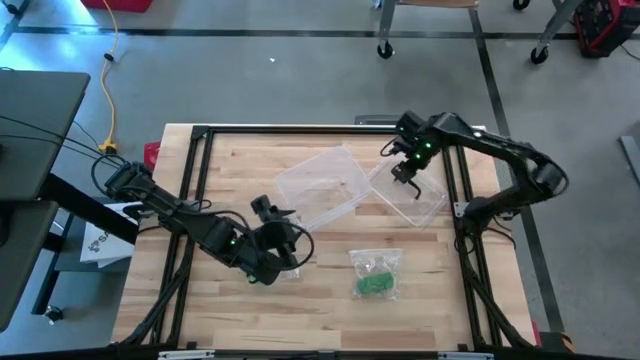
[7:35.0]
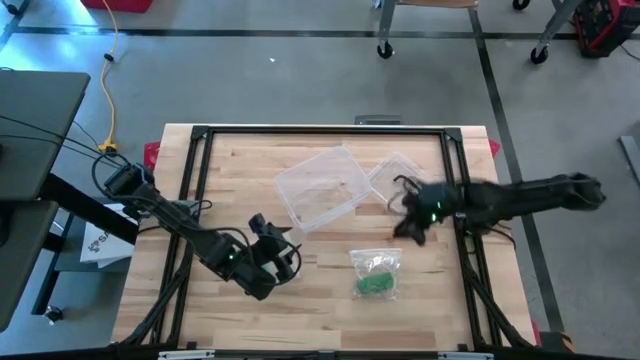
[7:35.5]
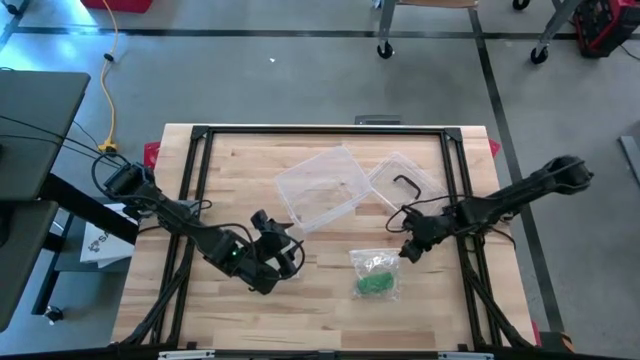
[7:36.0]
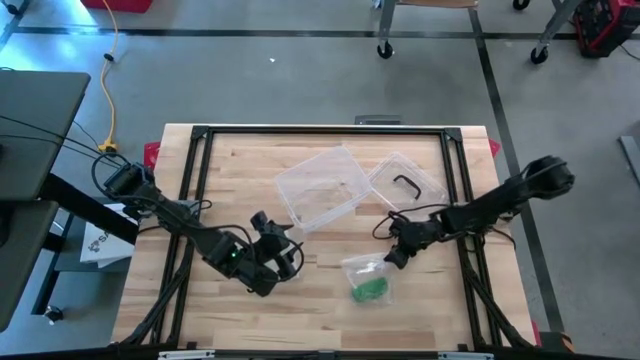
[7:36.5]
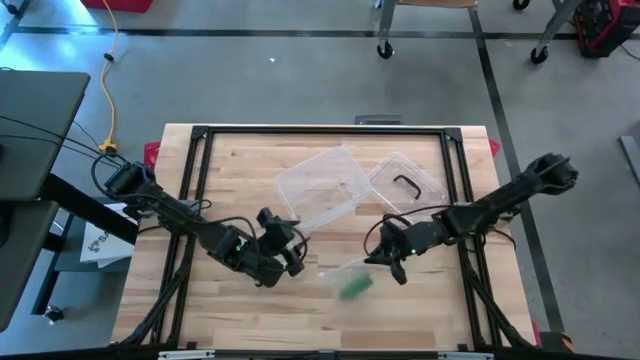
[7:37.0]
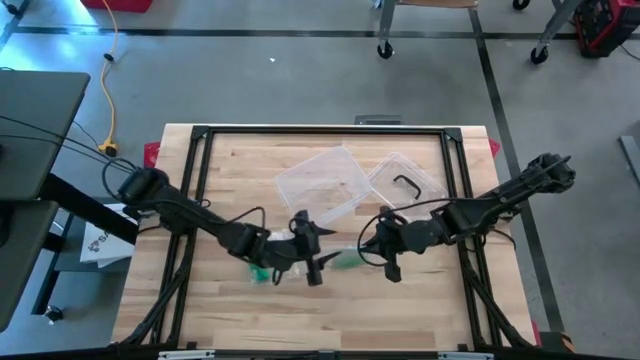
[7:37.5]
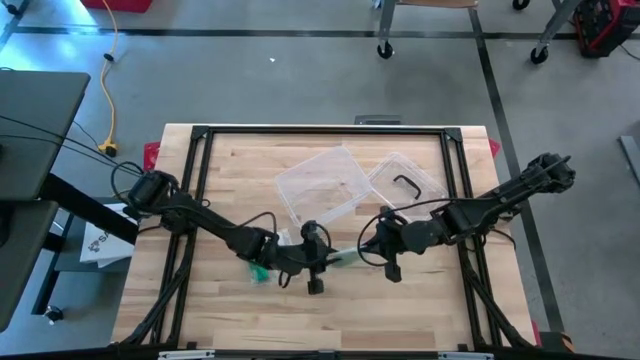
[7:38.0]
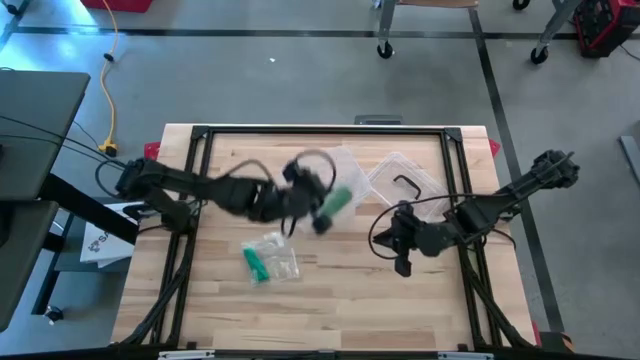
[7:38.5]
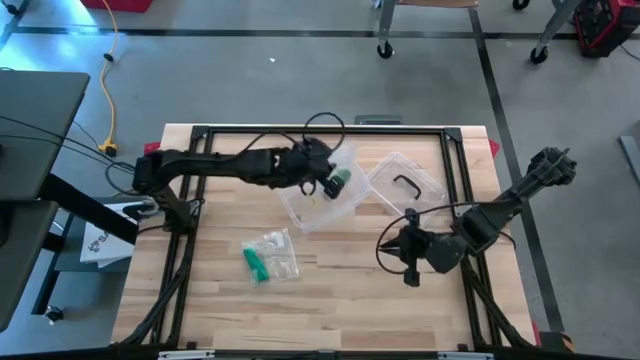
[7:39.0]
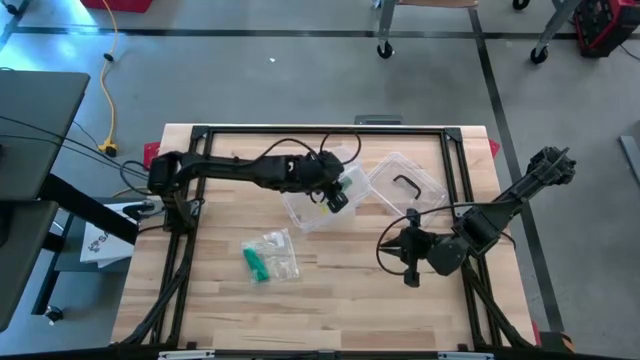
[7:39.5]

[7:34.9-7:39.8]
Task: Roll bandage
Put the transparent zip bag with the green bandage into the transparent bin

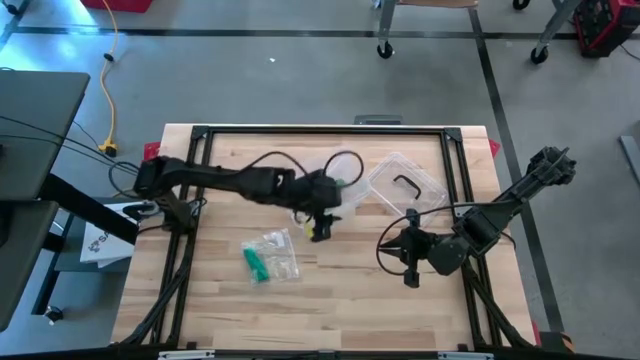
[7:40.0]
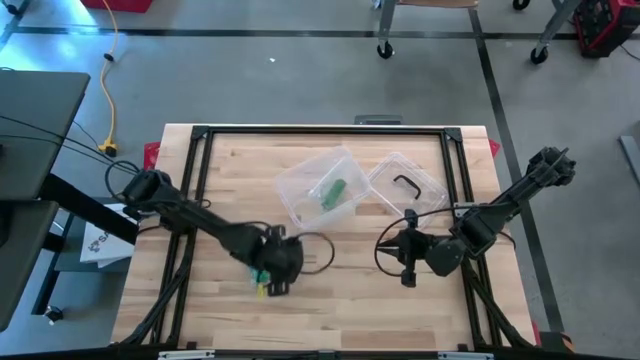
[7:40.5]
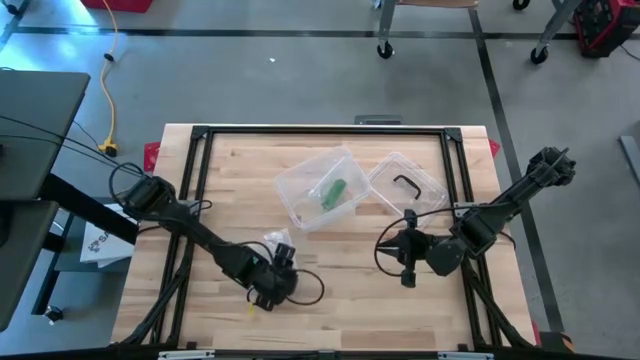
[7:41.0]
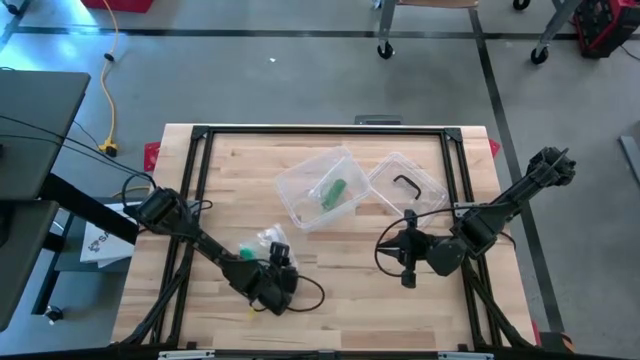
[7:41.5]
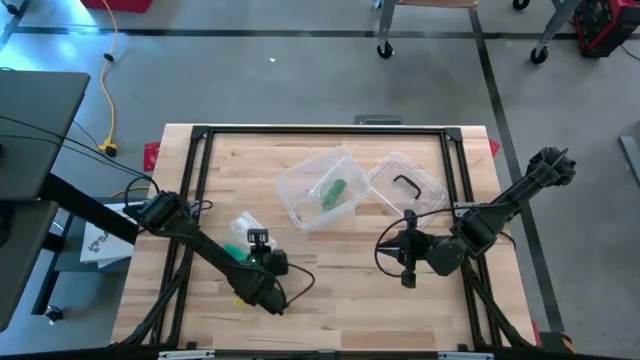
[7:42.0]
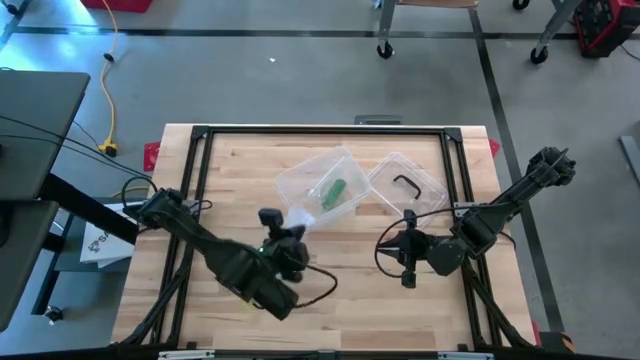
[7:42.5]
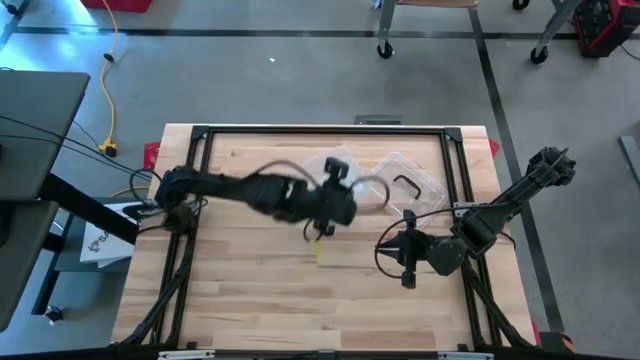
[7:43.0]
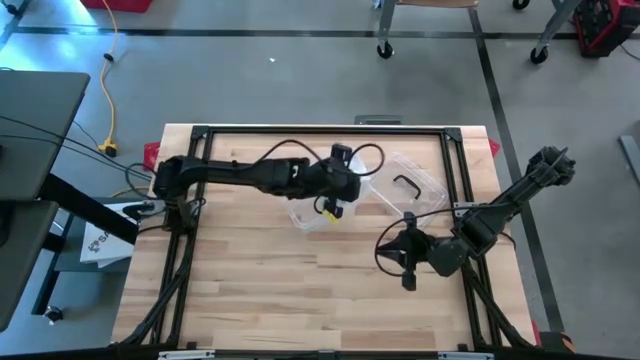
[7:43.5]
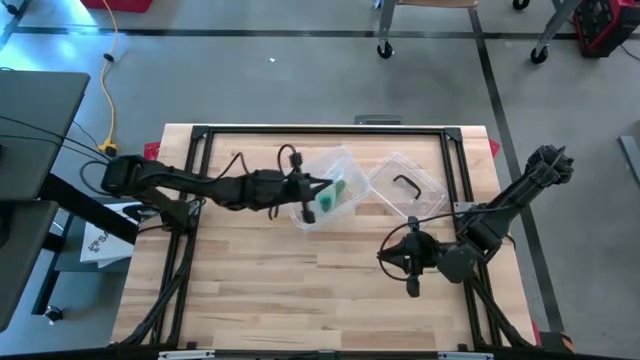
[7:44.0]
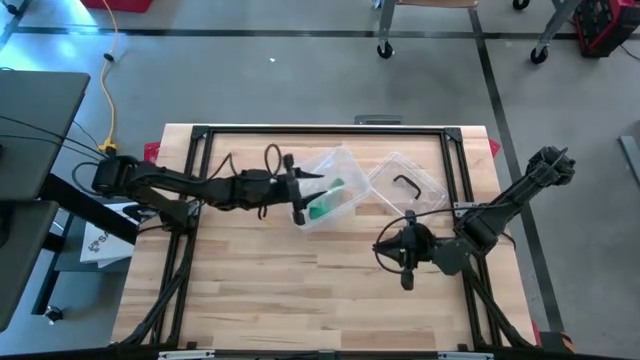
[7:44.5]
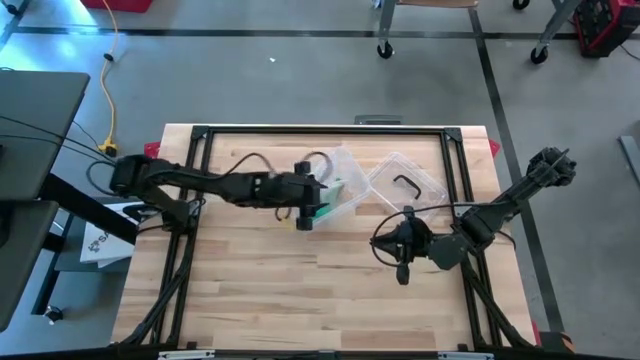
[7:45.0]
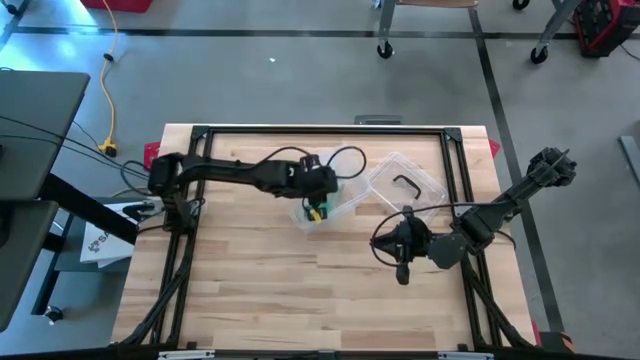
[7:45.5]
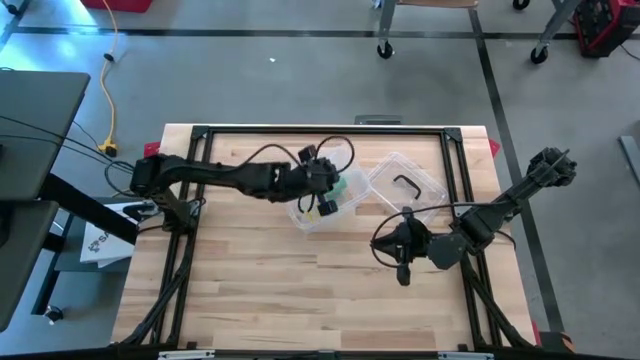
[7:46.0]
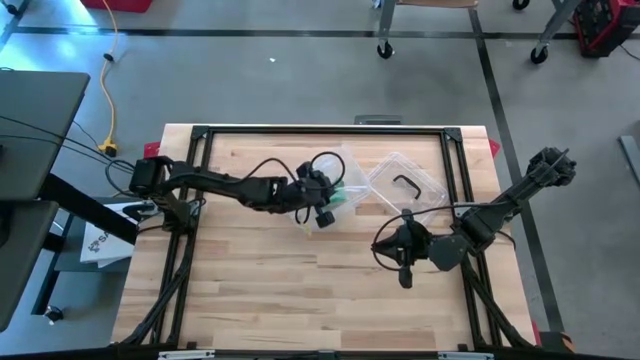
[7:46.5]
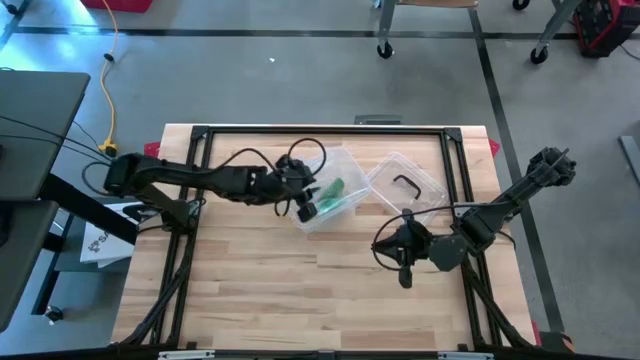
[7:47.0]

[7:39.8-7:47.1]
Put the transparent zip bag with the blue bandage into the transparent bin

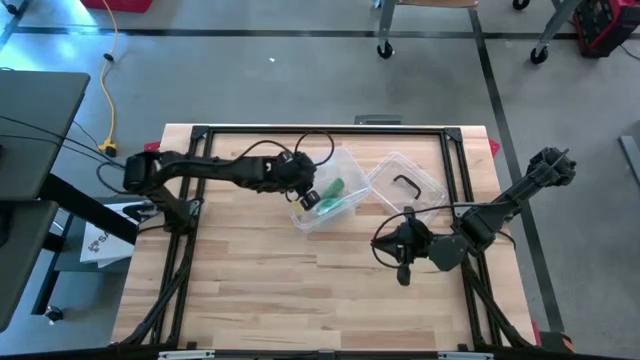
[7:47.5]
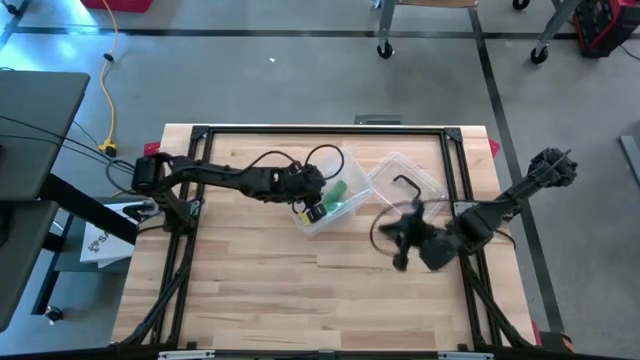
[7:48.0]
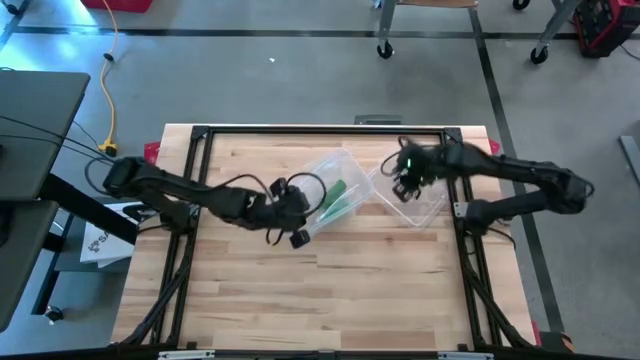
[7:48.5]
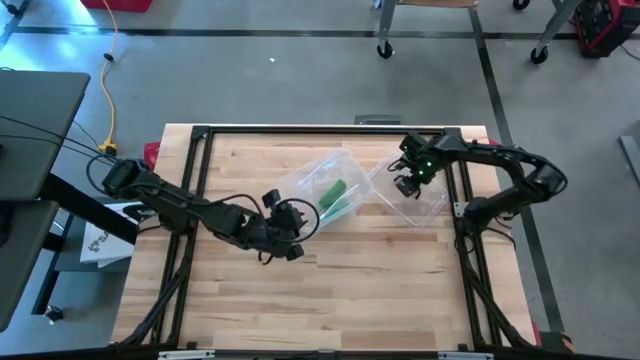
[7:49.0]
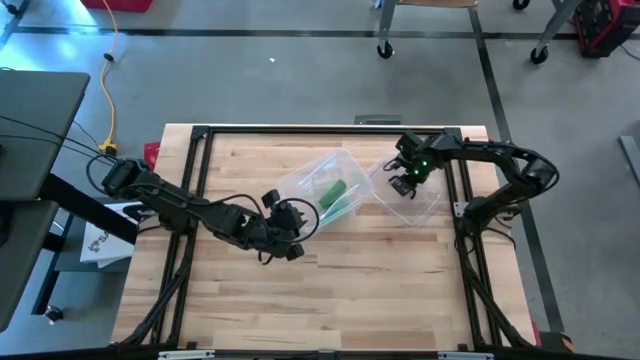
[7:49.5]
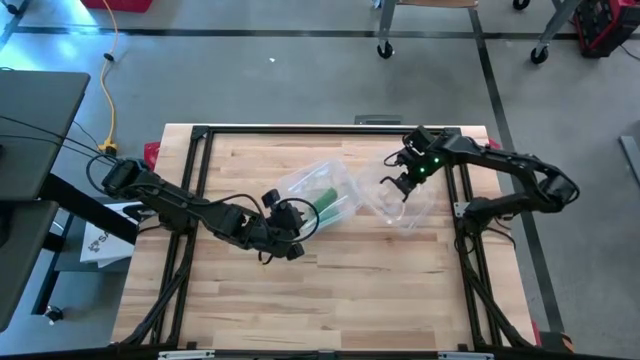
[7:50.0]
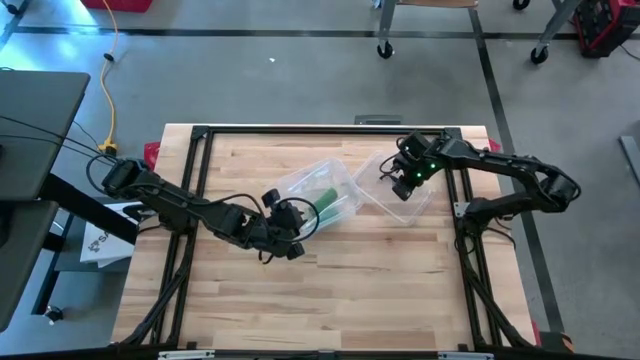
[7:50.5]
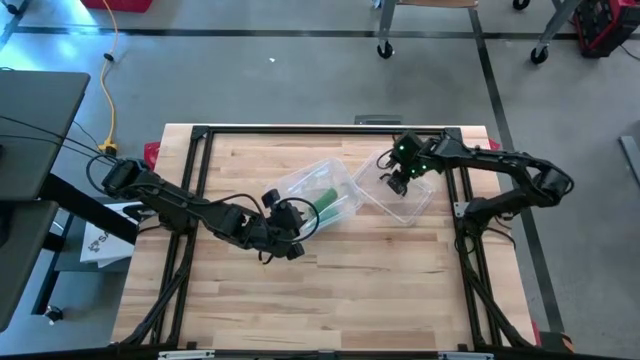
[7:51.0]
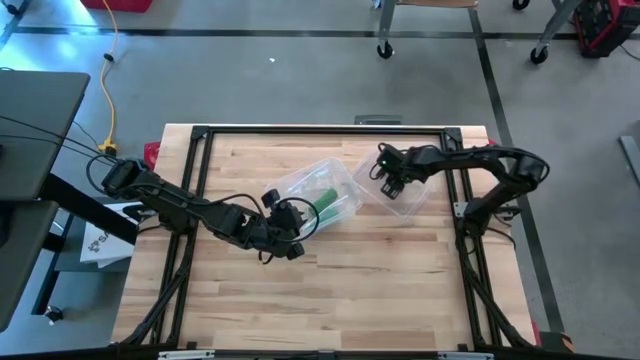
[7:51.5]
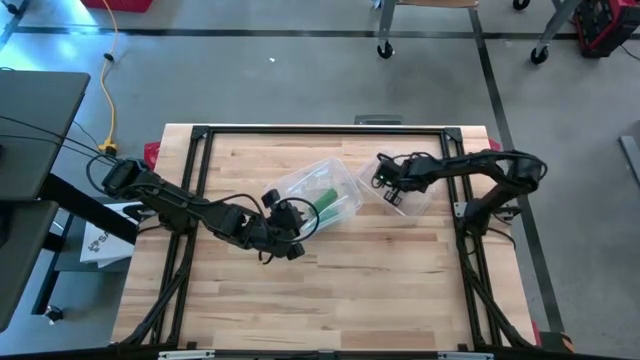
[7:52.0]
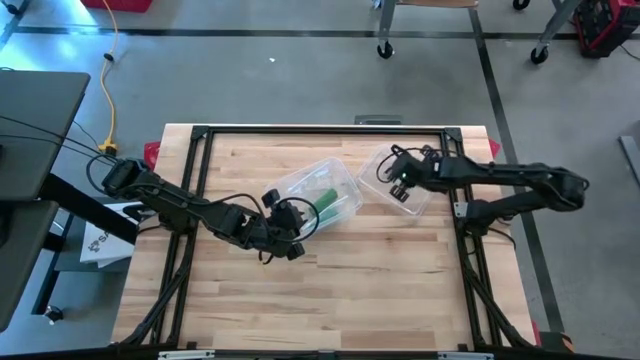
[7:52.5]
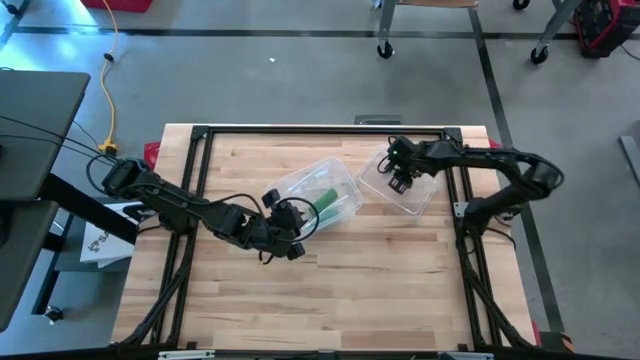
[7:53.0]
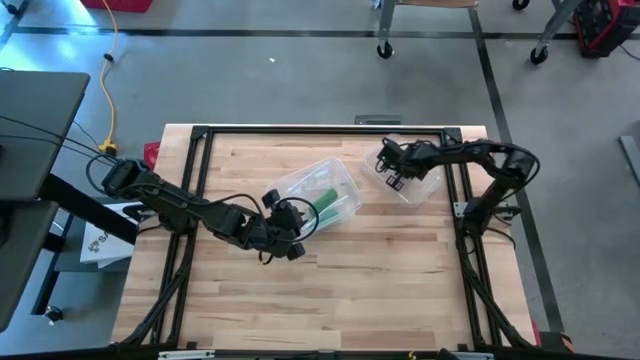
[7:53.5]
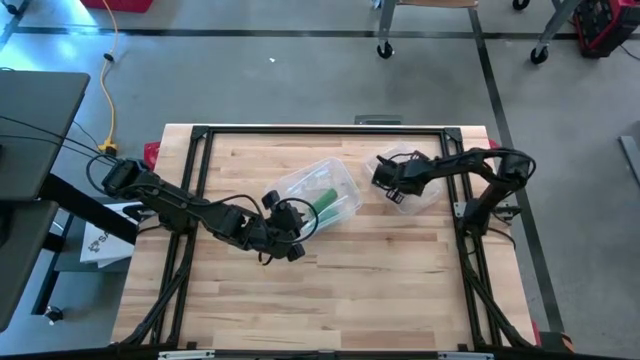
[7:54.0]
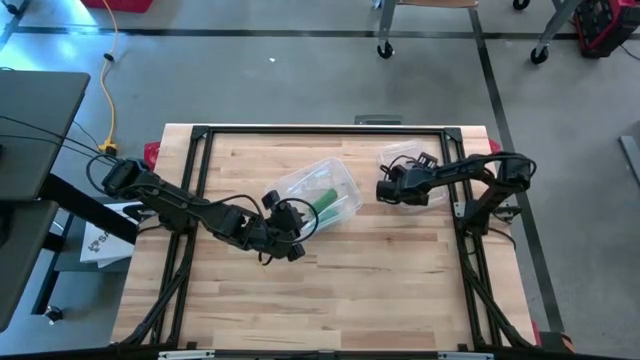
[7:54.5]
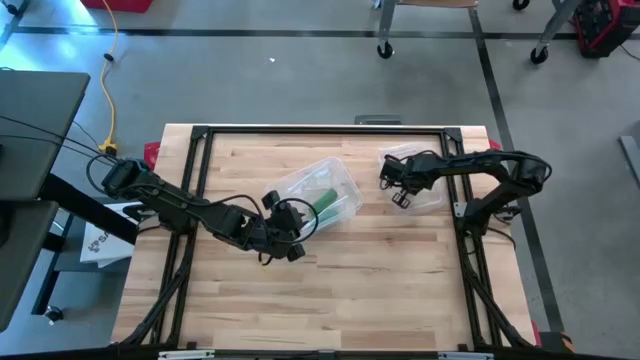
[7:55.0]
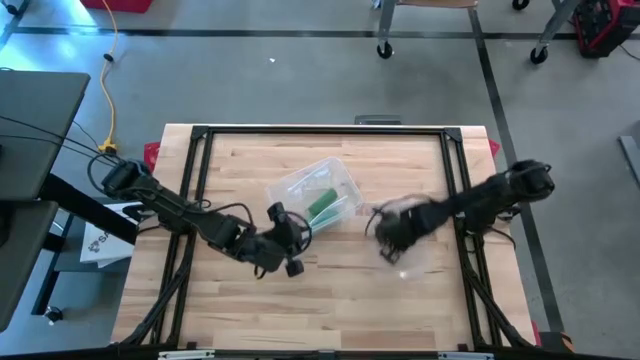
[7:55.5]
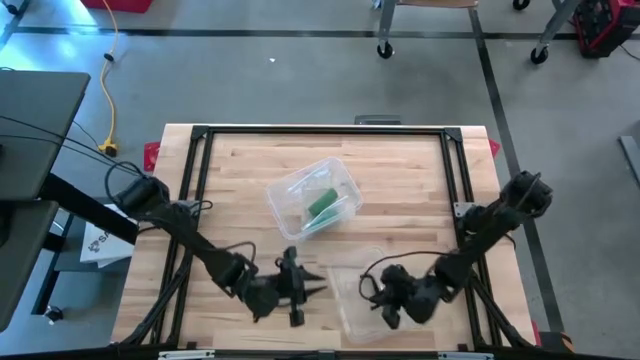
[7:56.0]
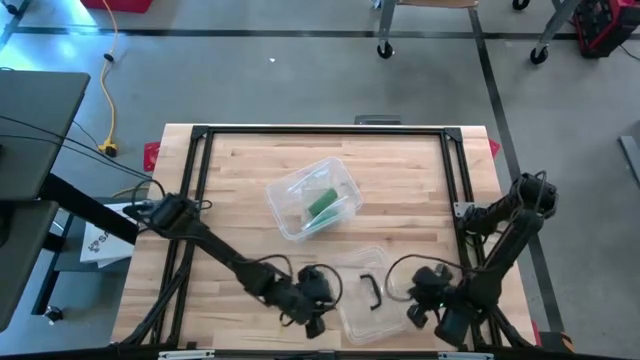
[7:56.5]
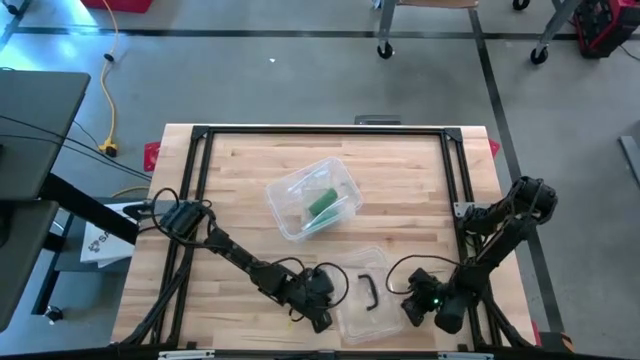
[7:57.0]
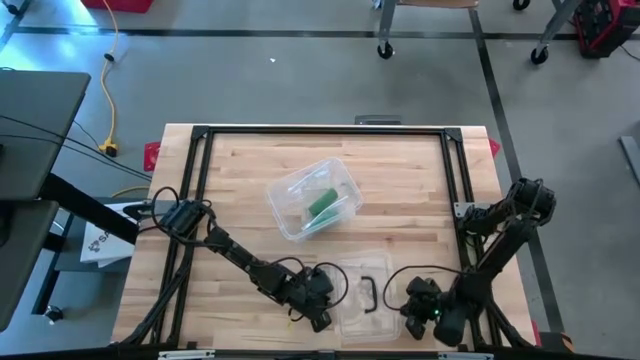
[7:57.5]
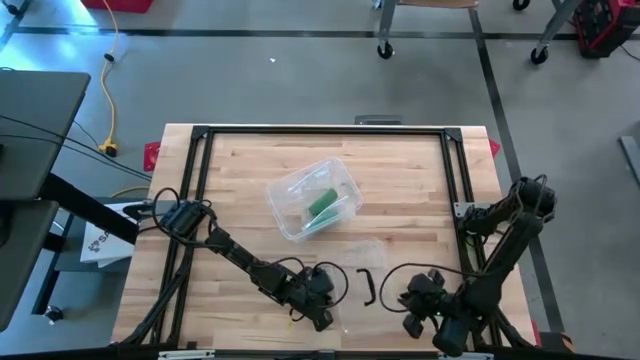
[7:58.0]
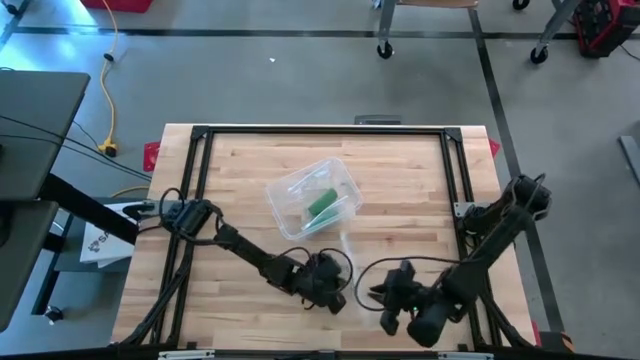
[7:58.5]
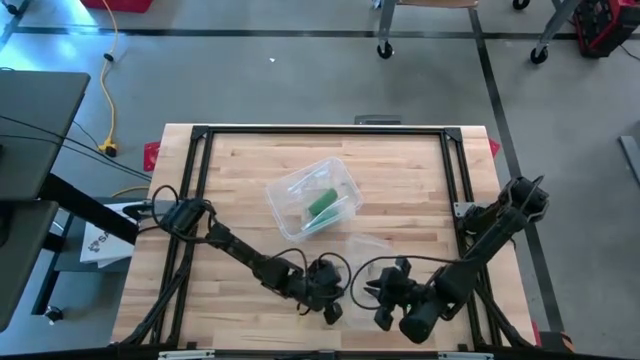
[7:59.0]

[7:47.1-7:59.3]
Close the transparent bin
